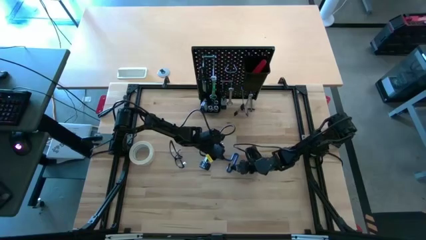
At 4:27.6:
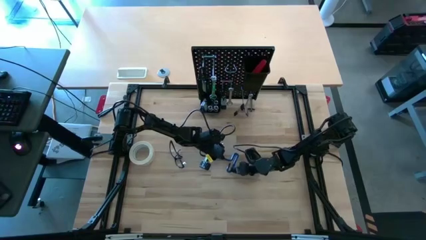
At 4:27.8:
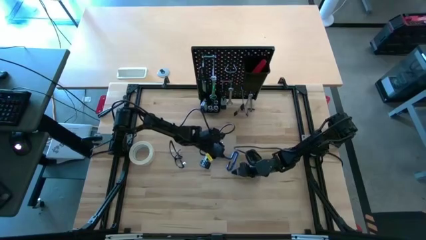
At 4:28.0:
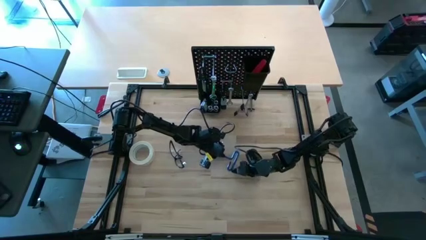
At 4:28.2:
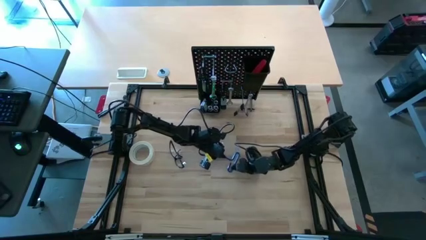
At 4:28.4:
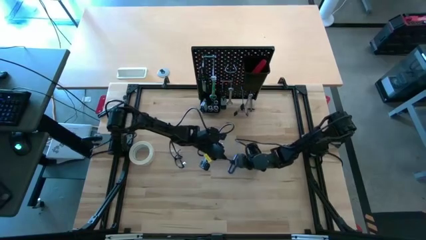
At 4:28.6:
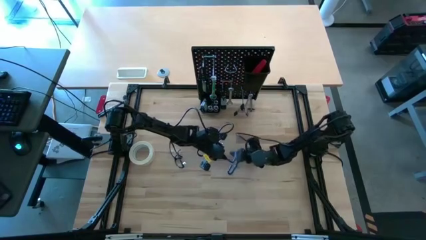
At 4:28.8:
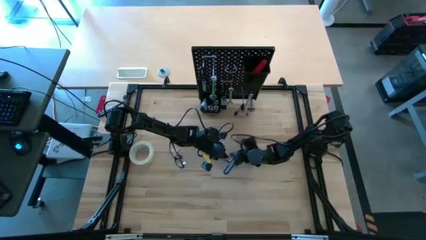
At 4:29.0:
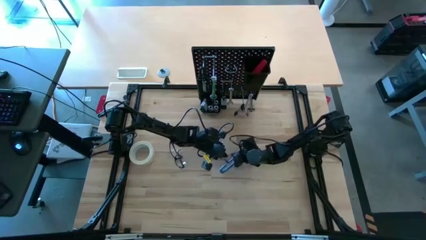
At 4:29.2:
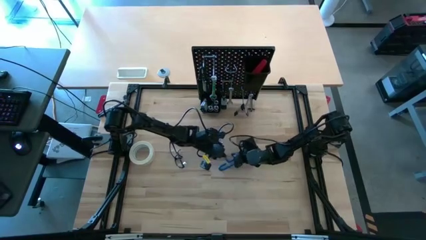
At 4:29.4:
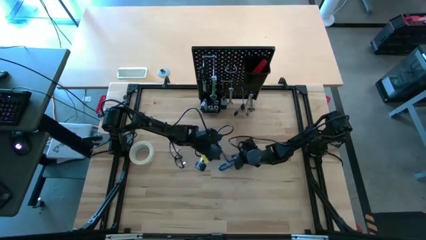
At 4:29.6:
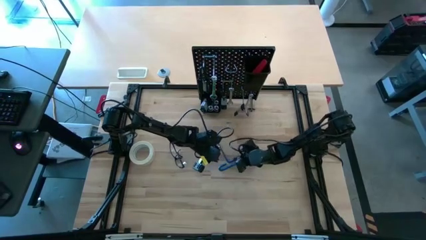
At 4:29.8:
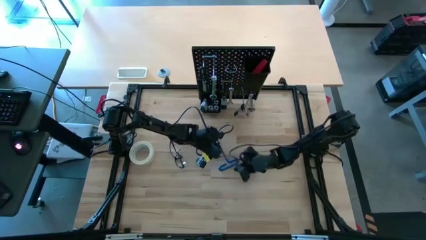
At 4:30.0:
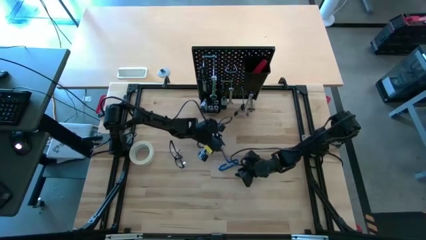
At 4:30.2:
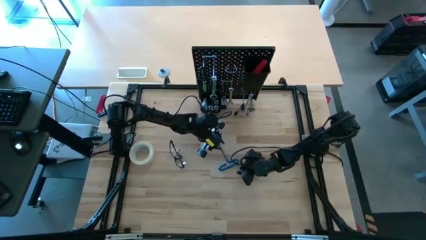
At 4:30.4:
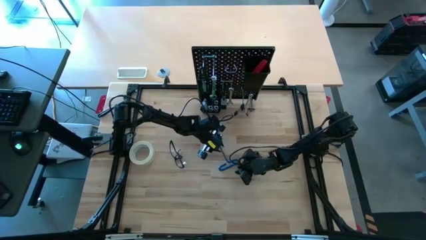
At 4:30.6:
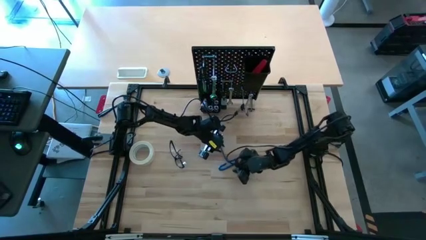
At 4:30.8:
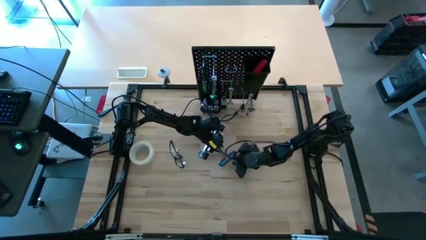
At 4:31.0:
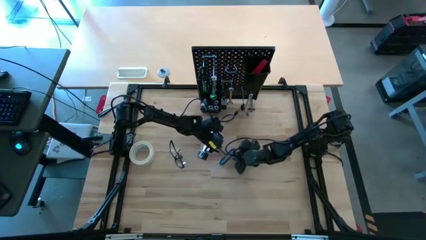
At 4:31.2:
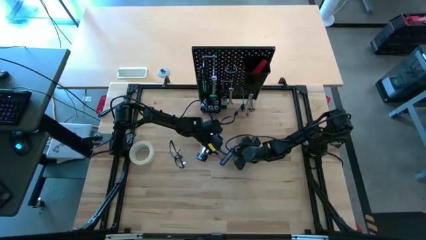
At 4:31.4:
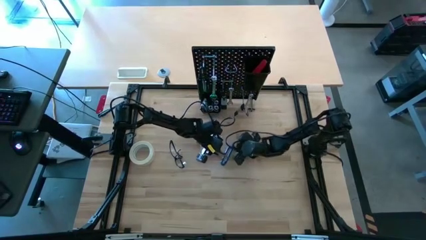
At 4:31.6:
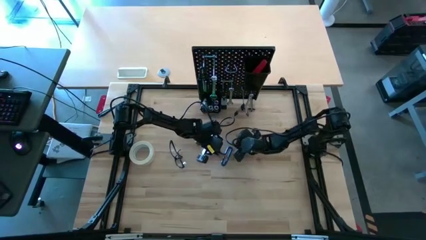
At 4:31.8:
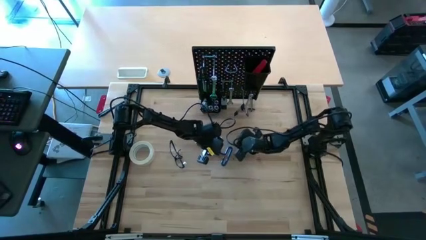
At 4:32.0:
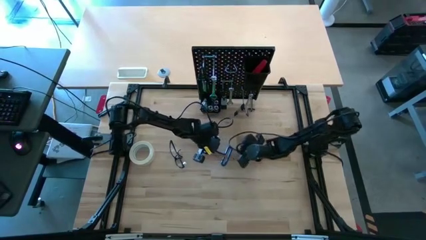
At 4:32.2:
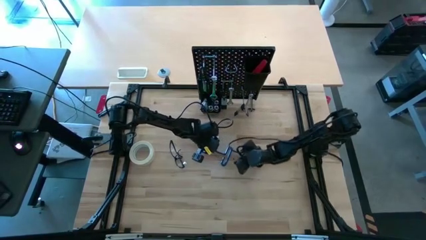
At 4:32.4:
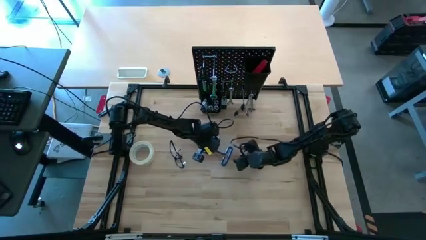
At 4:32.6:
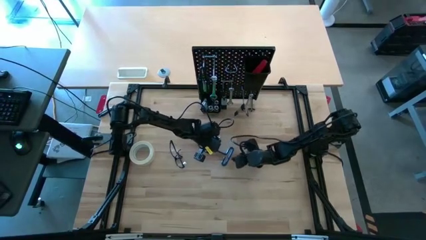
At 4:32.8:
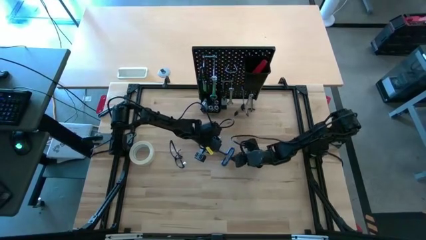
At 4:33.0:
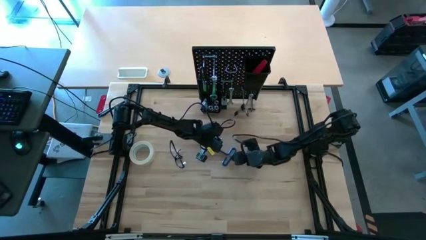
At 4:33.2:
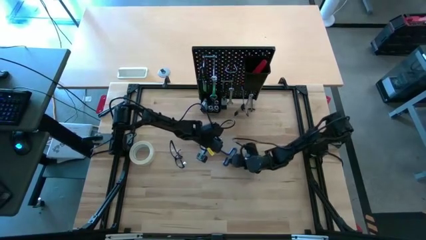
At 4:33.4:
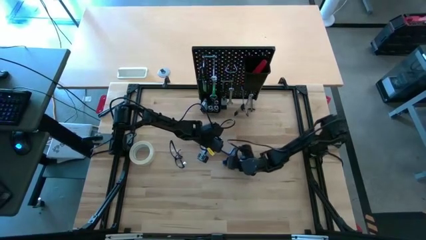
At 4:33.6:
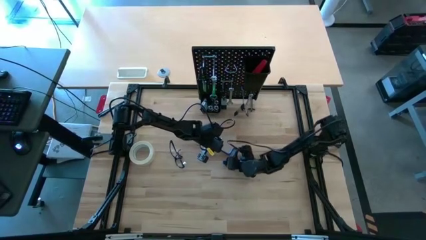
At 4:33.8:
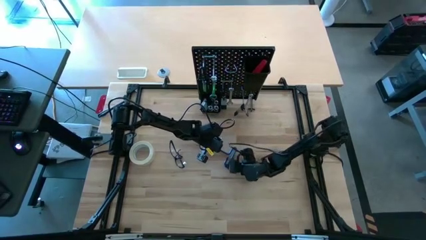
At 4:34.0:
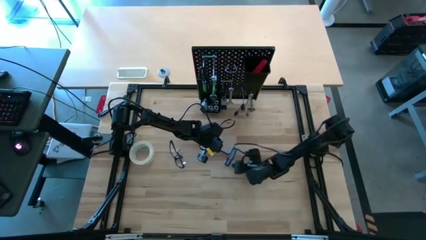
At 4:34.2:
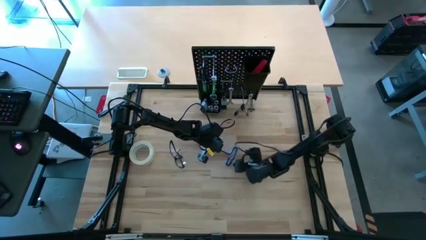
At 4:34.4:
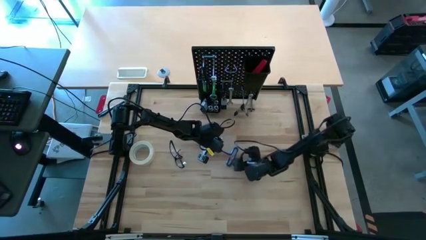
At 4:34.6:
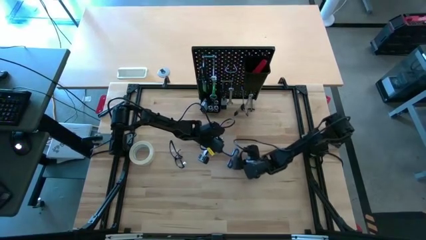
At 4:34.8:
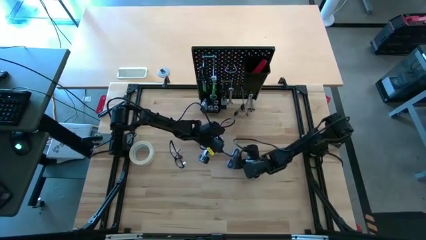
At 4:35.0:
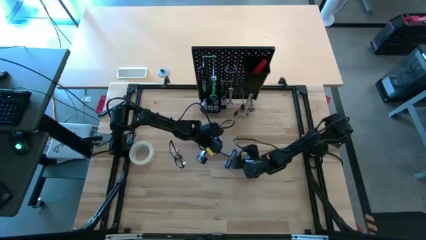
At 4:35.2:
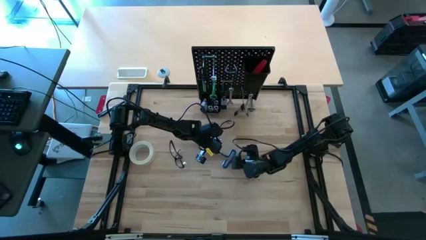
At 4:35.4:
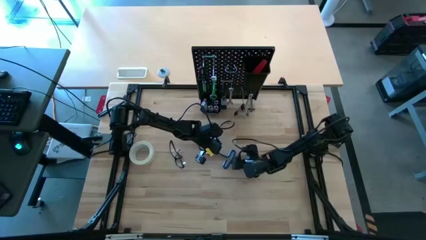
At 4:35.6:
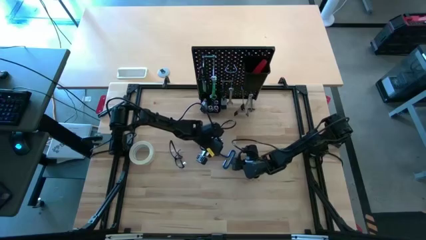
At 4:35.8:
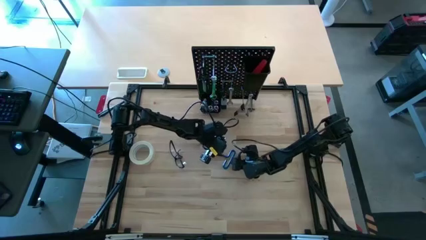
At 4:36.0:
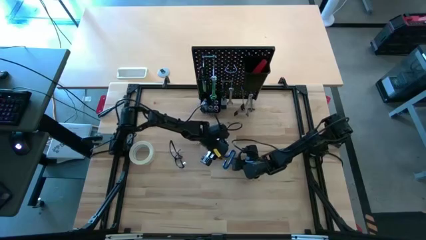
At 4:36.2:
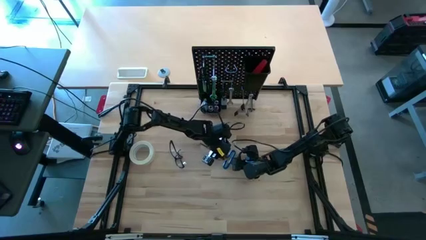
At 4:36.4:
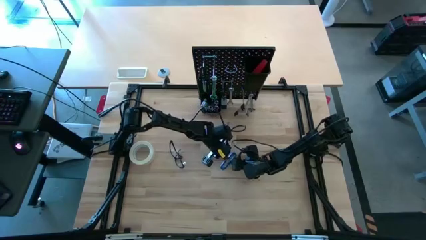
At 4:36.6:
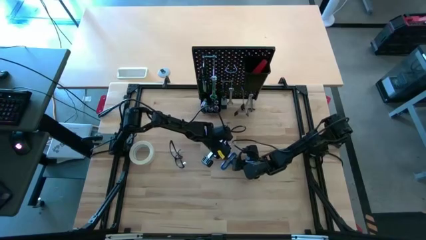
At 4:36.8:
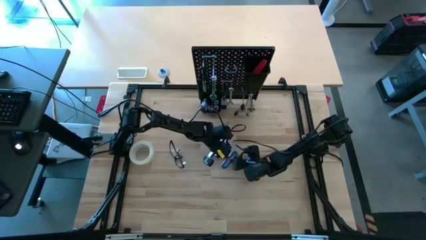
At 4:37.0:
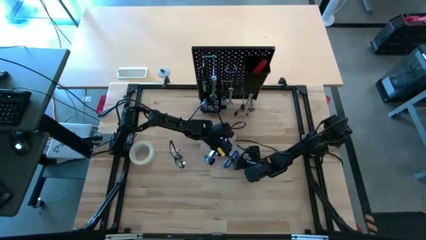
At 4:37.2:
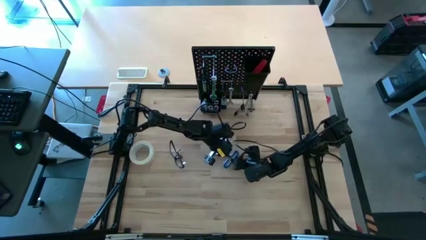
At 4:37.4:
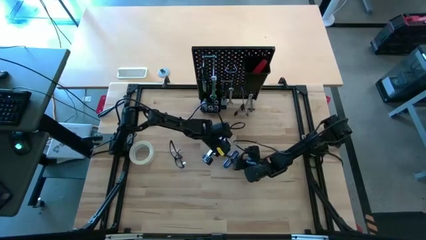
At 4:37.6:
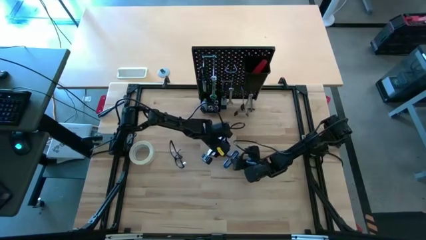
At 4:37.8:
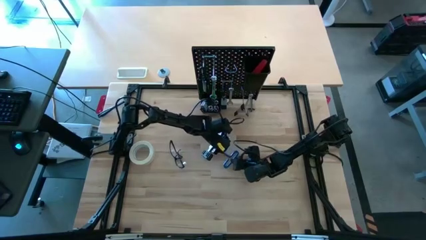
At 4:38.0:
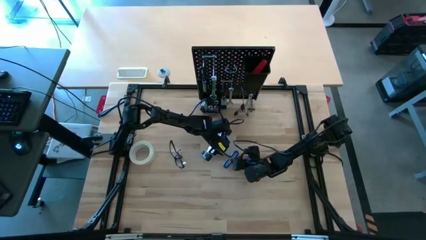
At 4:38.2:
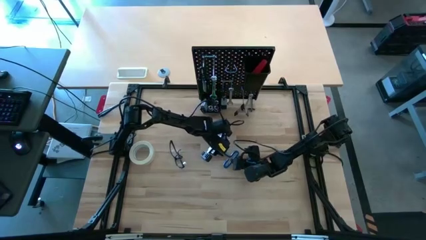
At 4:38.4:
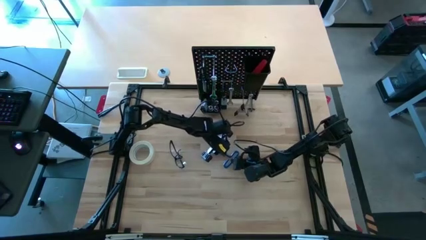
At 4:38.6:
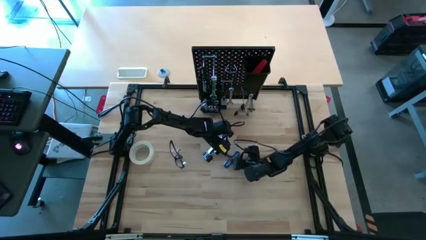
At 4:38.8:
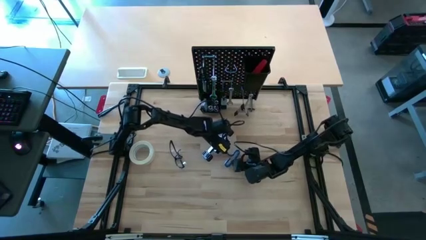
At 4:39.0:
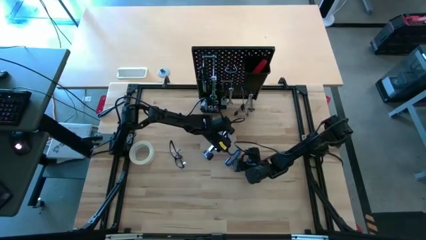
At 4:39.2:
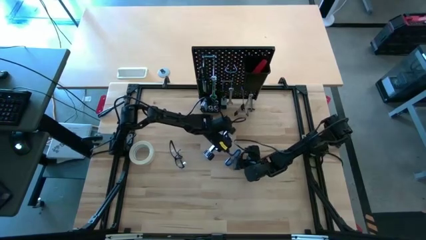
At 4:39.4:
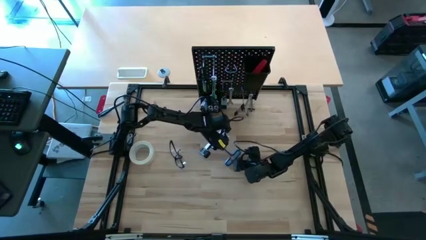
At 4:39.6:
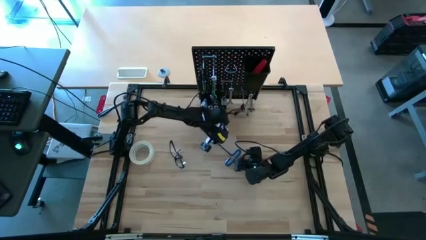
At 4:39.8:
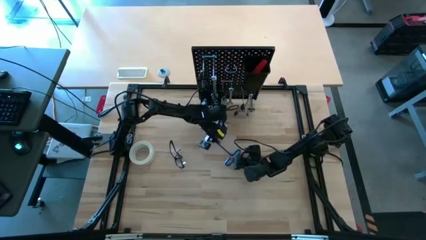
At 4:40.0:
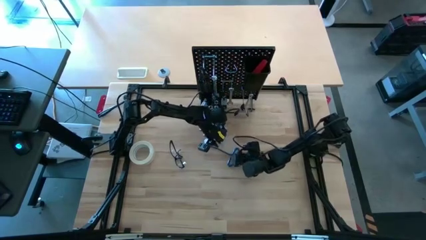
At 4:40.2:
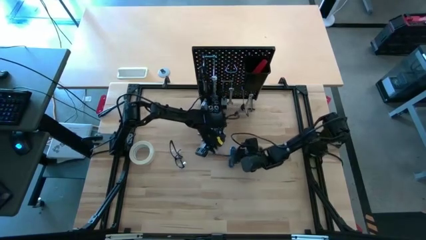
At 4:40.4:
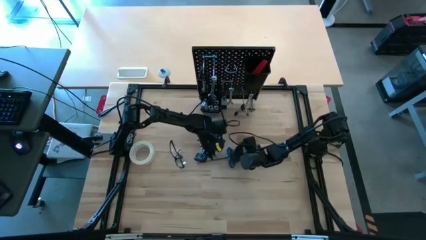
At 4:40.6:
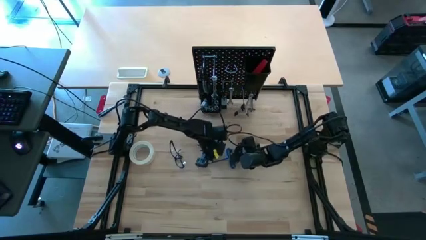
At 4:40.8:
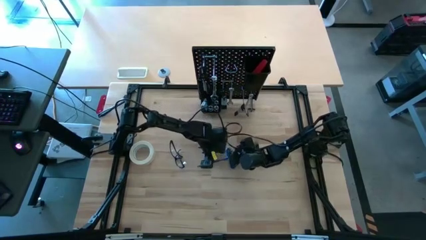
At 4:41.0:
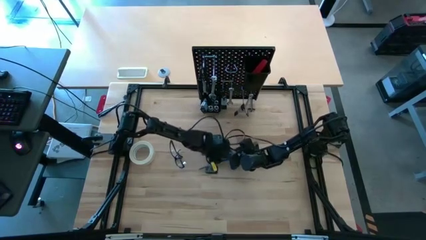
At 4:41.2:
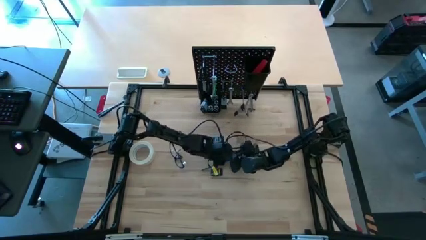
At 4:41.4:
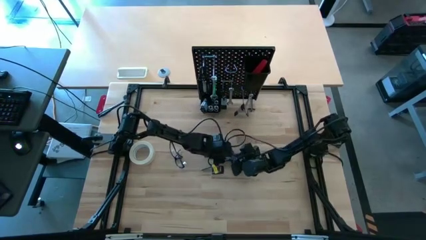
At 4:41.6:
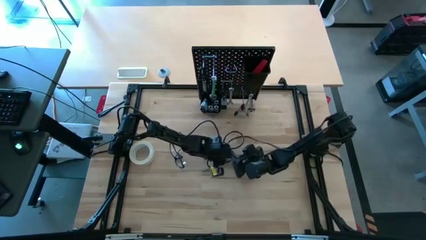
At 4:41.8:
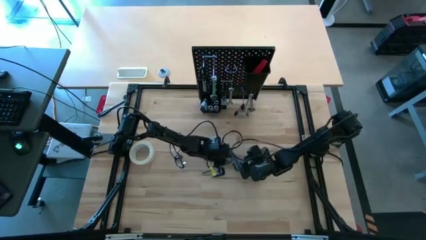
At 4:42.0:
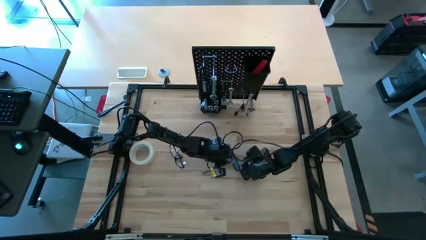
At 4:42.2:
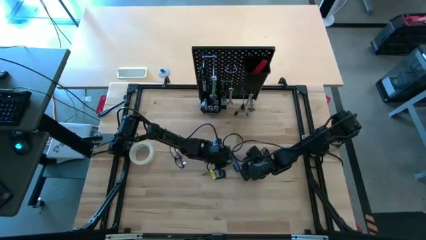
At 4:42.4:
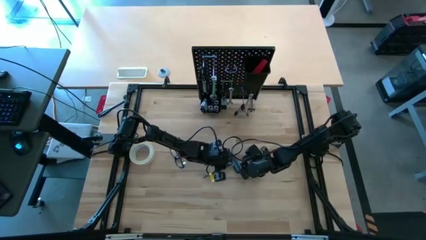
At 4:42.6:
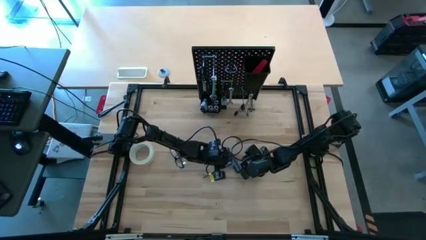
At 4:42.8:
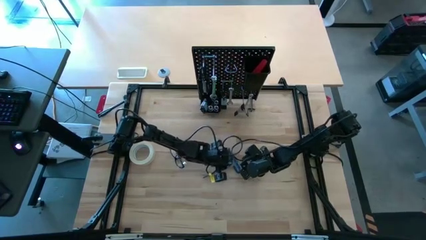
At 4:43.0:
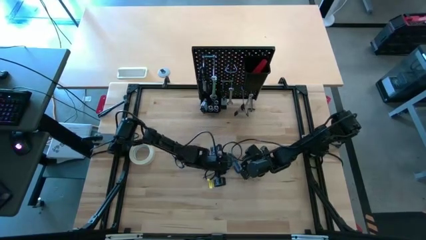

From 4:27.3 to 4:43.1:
Task: Hang tools onto peg board
Put the pick tool into the black bin on the peg board
